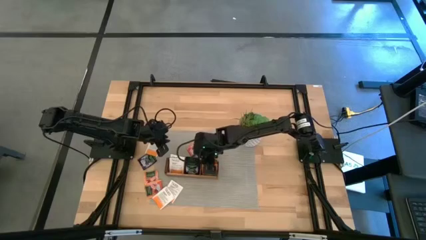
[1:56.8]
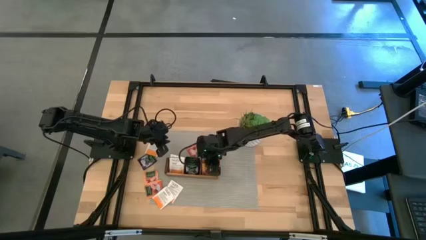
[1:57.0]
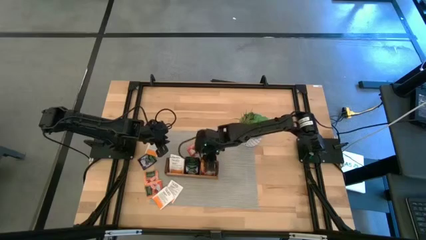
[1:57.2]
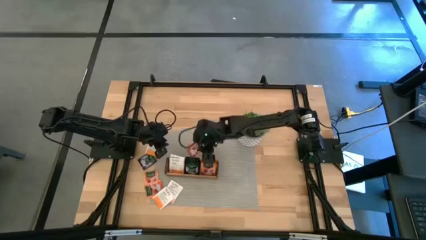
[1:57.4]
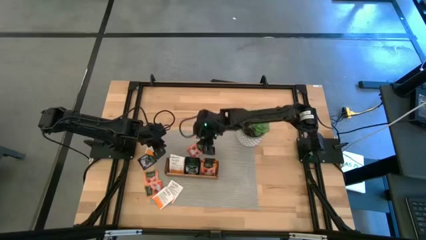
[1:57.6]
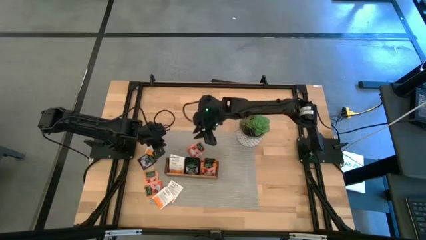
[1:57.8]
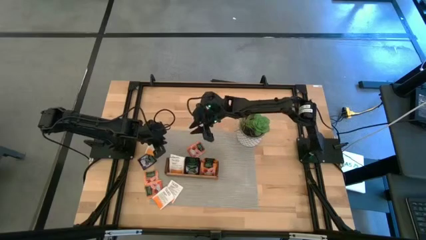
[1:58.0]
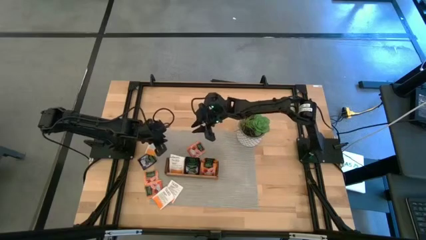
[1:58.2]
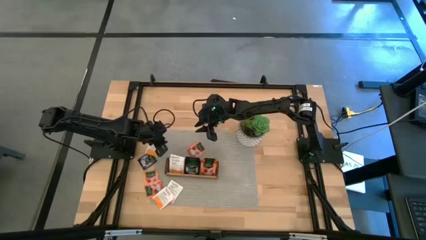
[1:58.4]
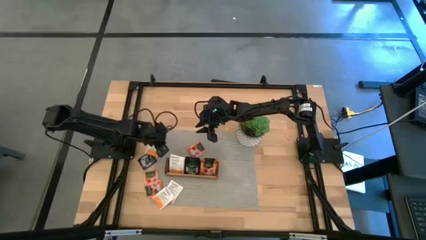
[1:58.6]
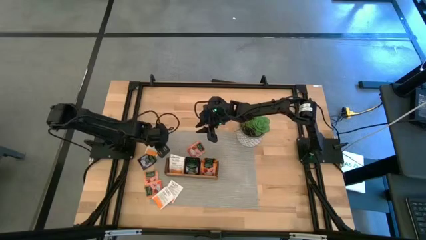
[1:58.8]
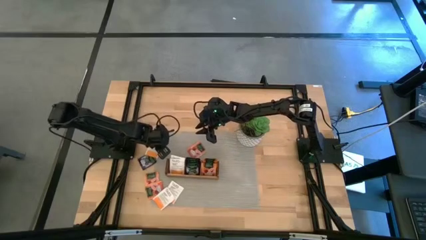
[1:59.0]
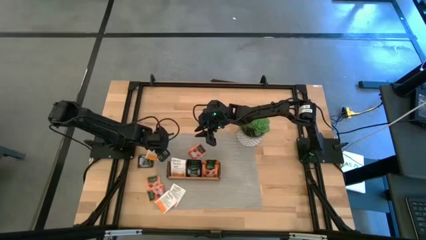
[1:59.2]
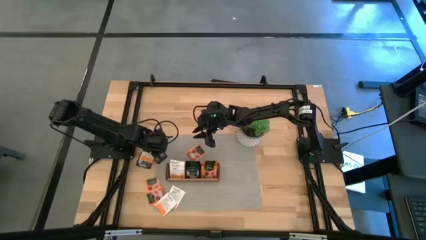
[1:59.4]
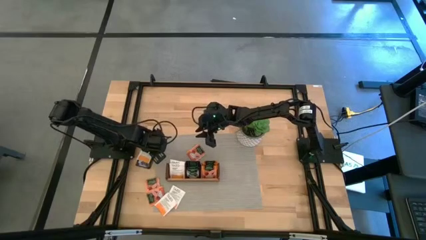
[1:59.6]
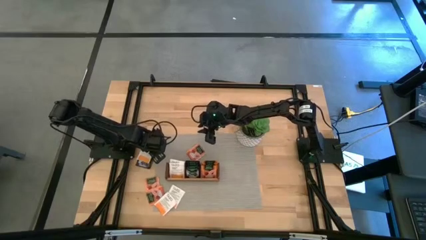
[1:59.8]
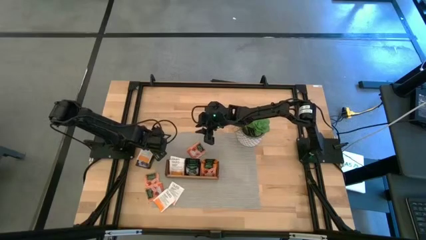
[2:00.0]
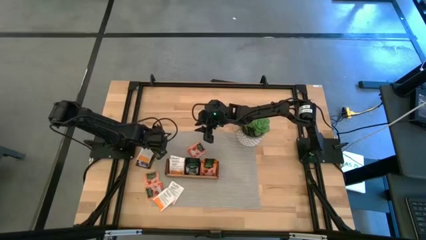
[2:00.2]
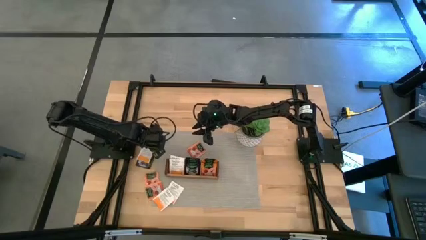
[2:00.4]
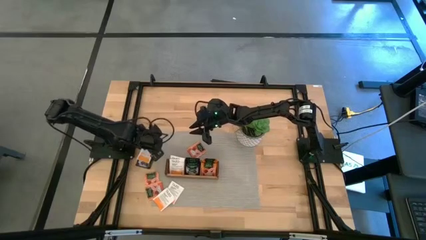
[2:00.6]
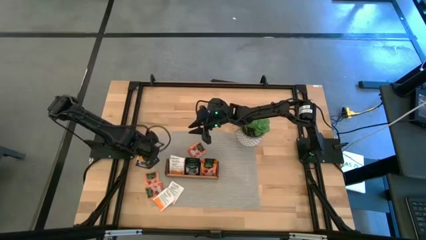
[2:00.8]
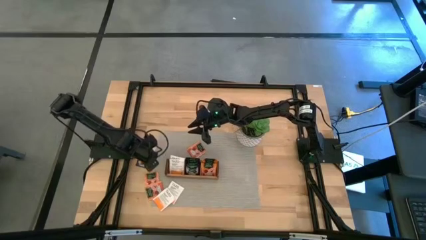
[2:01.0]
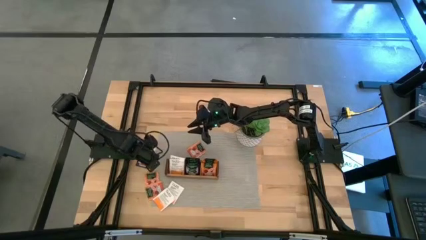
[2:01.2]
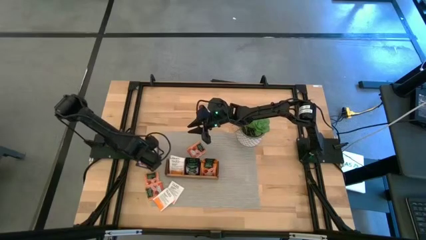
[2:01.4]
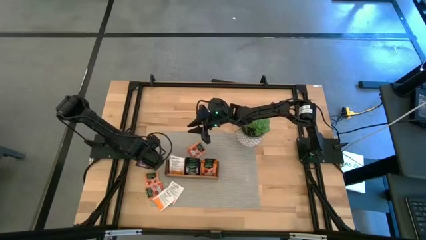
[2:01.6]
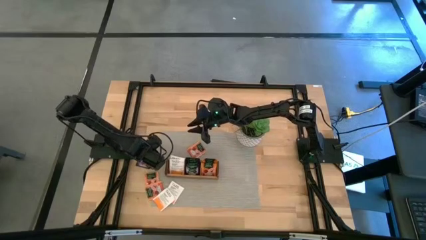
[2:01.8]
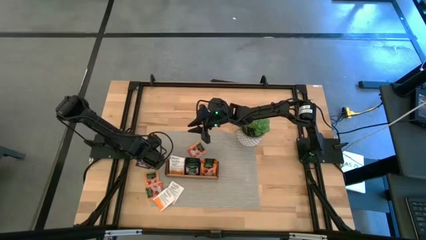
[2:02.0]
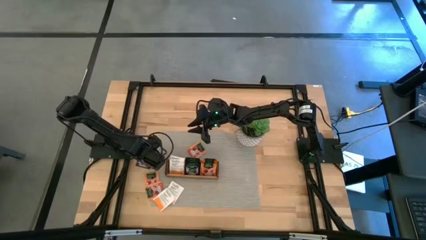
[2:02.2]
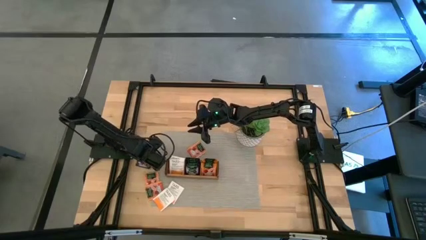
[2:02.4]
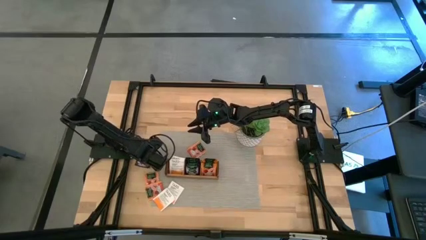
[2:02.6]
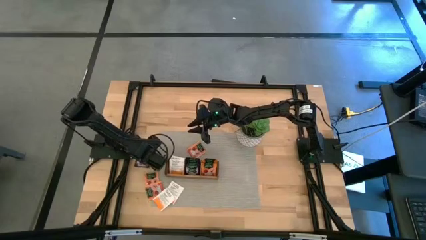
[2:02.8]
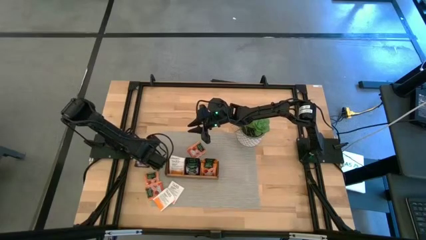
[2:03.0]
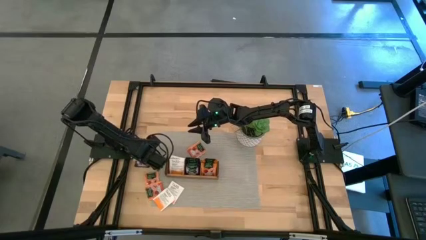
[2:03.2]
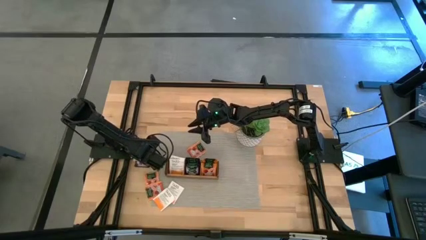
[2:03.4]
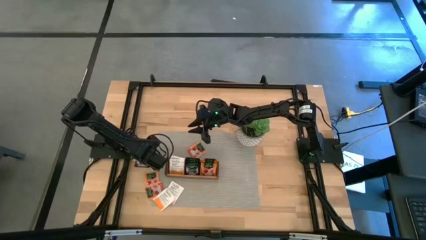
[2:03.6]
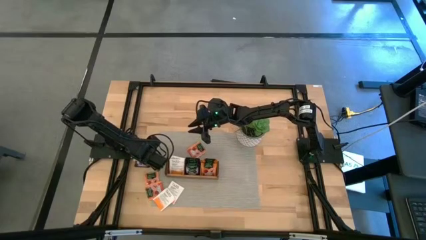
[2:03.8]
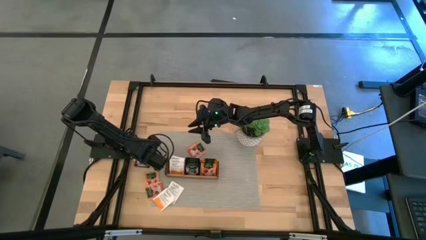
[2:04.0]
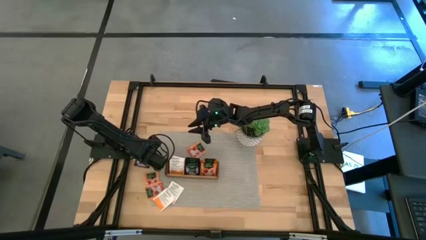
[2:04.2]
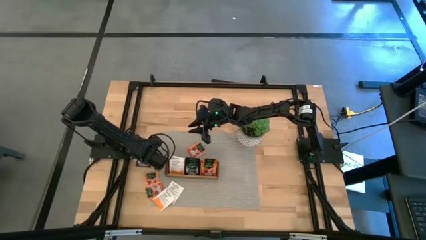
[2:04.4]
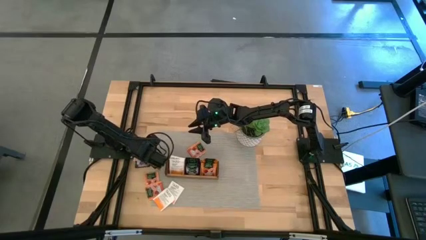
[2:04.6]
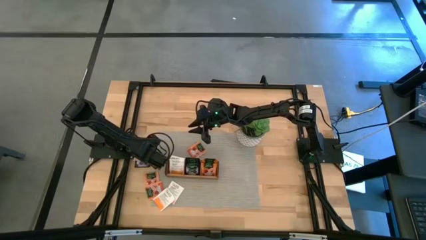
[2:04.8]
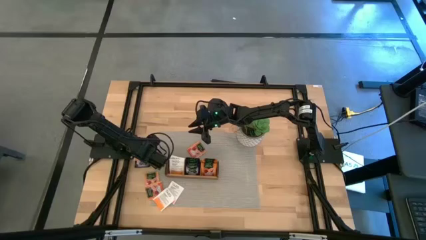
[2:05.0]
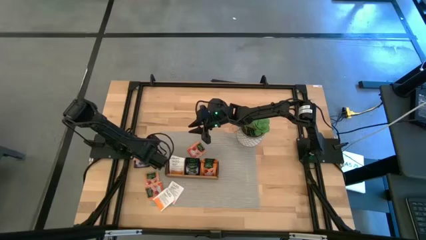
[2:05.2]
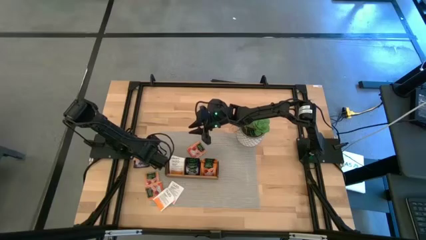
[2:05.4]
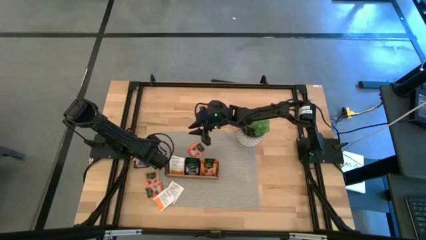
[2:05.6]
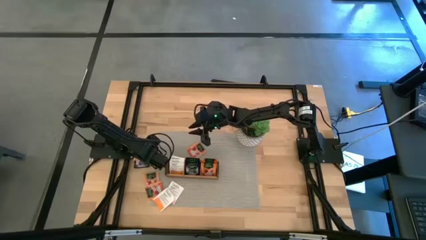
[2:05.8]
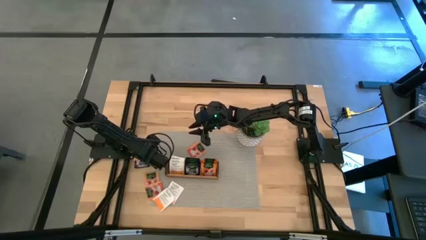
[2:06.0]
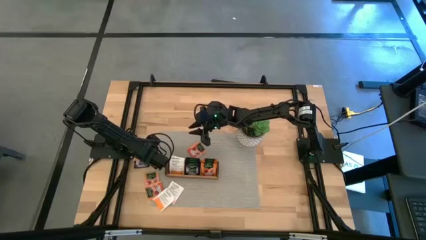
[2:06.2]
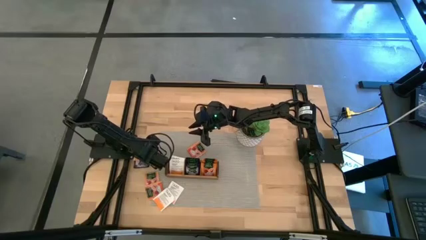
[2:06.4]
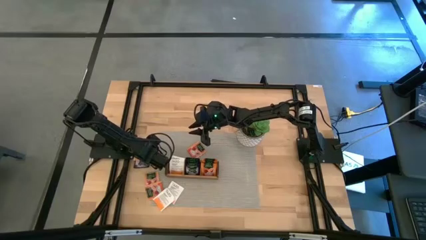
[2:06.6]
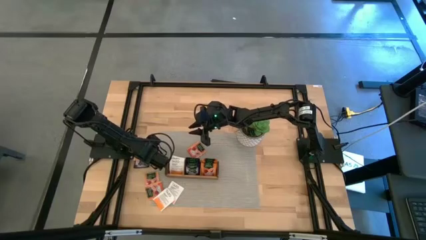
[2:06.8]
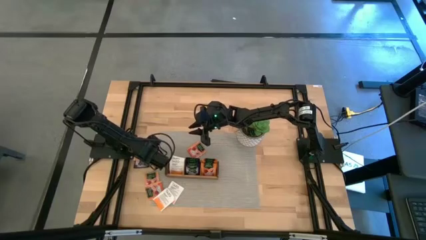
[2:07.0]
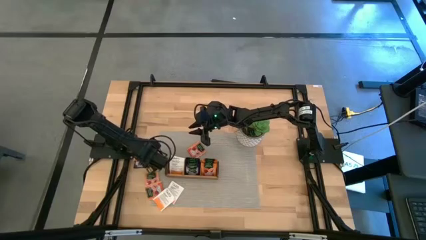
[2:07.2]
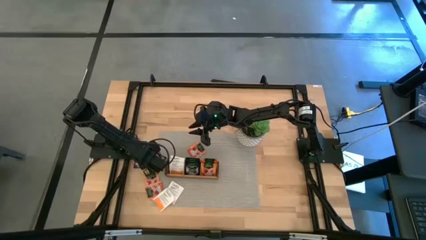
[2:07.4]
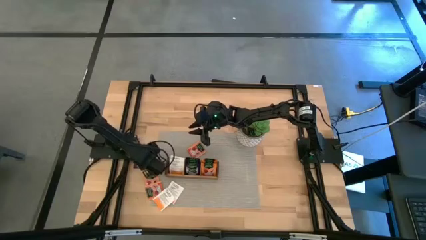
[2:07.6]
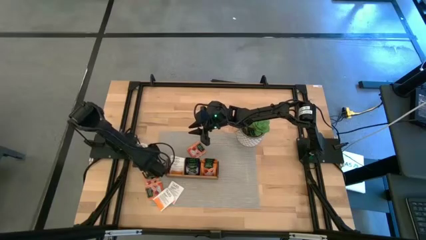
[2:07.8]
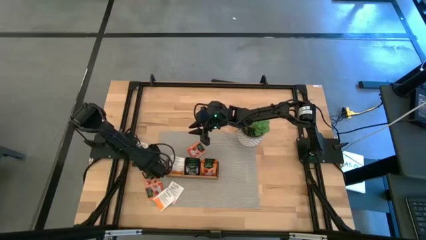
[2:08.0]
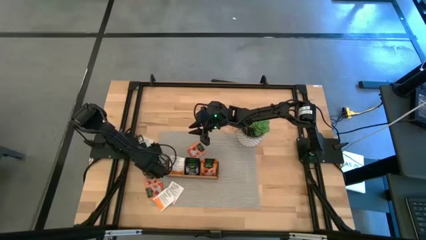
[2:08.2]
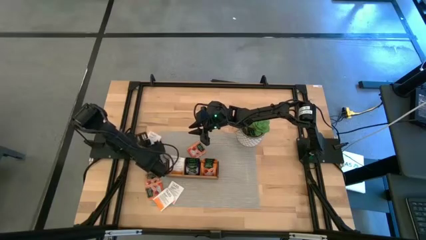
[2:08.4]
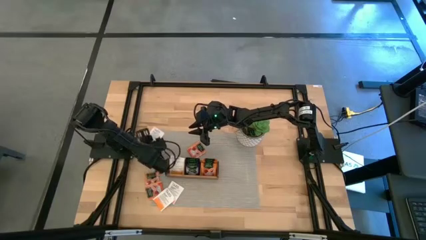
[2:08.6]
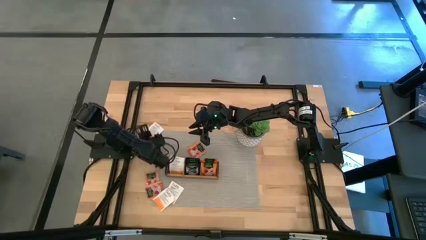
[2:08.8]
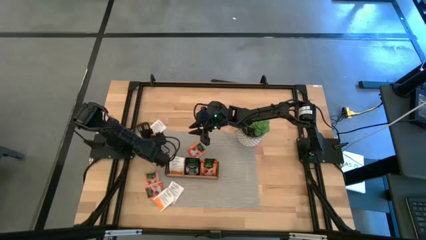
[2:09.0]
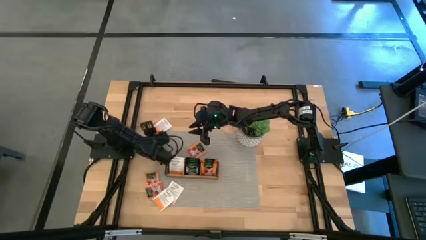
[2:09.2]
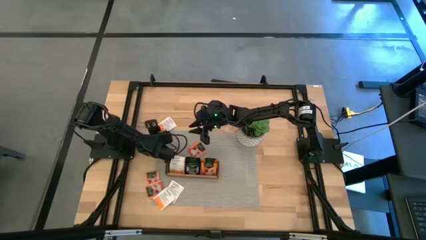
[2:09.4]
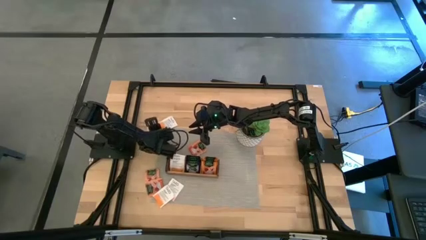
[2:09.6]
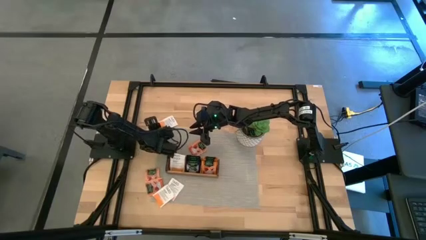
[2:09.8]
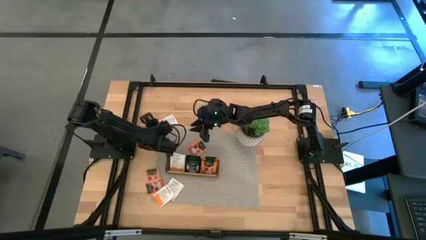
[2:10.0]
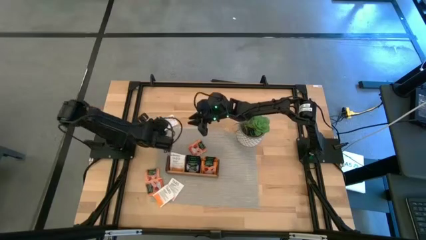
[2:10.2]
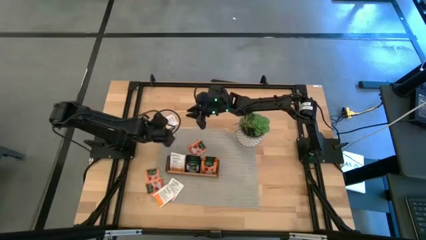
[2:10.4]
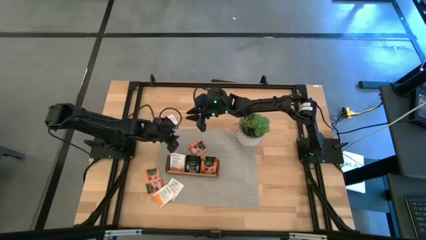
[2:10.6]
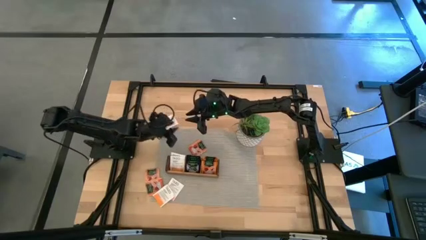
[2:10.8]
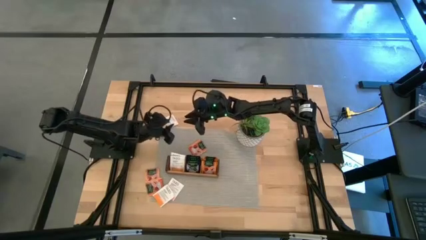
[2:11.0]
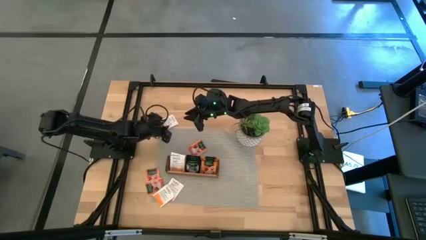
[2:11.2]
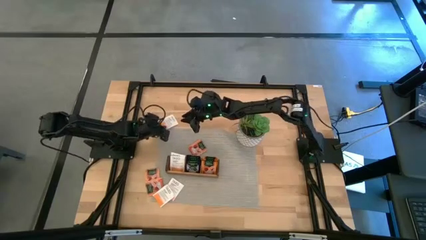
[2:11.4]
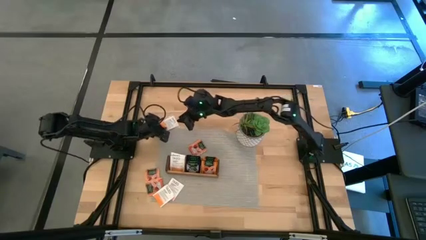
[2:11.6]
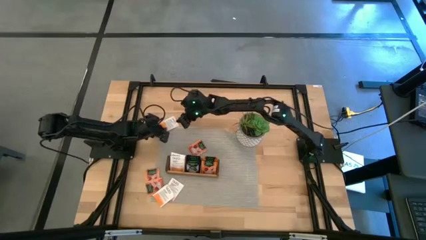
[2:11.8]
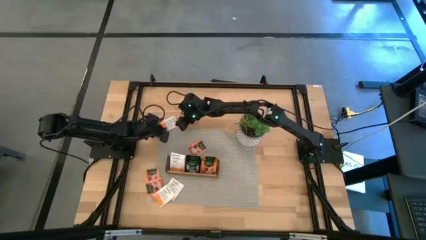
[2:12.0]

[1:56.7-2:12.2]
Task: Pick & Place Tea
Put the white tea bag into the left section of the wooden organizer

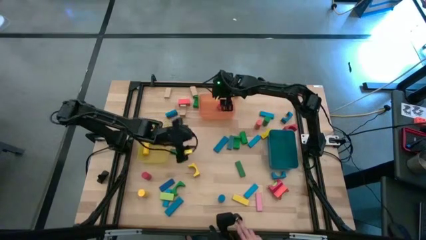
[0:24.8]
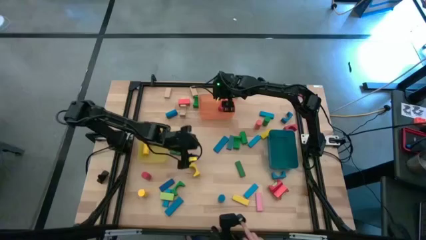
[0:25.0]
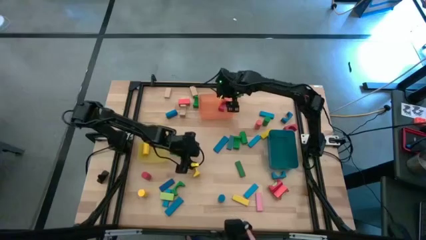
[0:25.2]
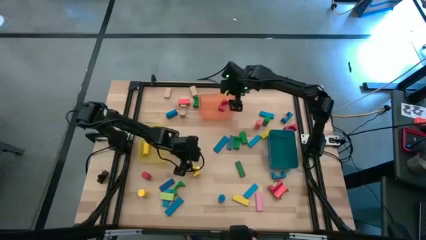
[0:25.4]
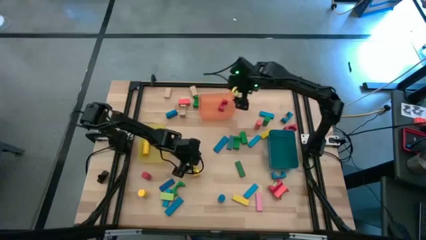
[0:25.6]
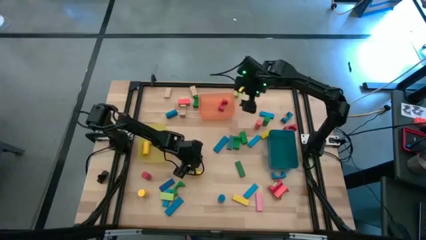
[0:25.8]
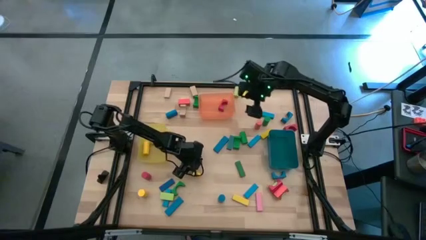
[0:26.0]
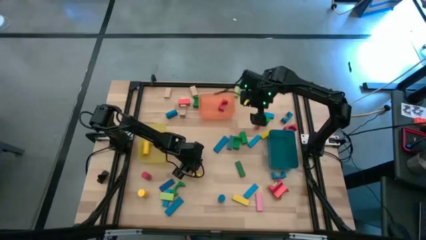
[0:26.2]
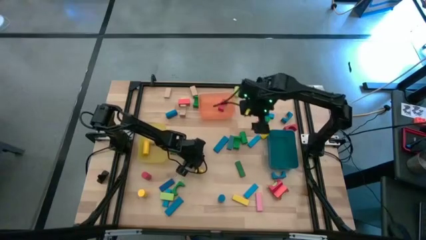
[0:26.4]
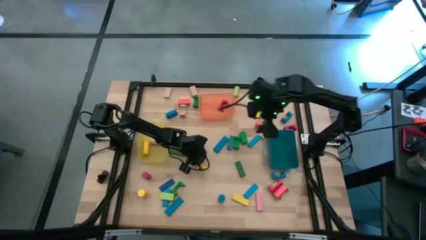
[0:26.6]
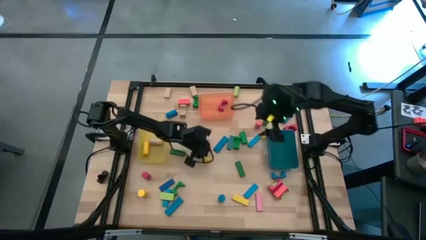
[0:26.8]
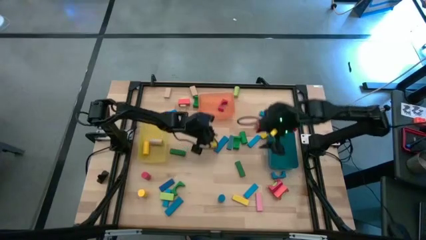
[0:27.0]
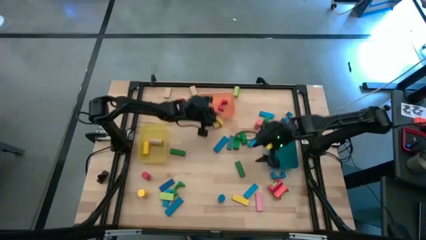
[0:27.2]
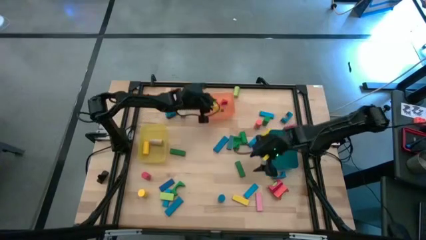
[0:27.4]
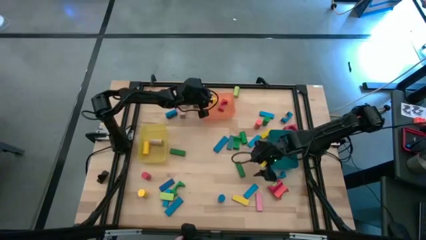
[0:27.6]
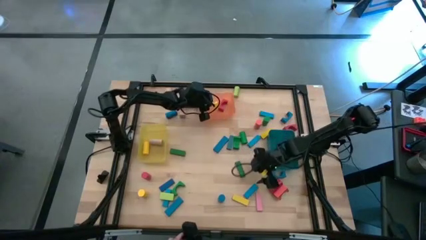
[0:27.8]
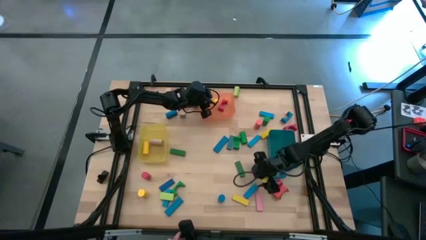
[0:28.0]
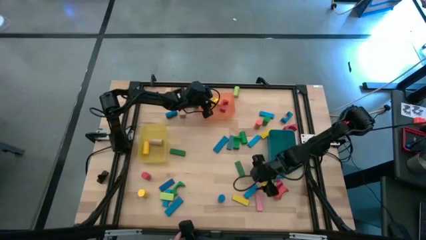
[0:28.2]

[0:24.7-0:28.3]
Task: Sort blocks by size
Put the yellow arch block into the orange bin
